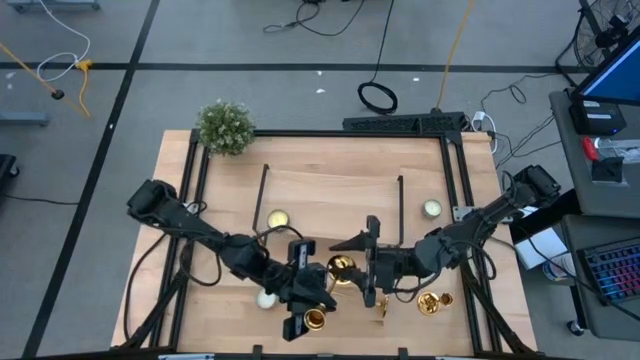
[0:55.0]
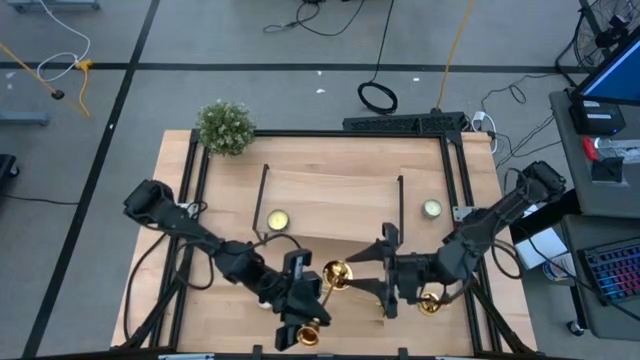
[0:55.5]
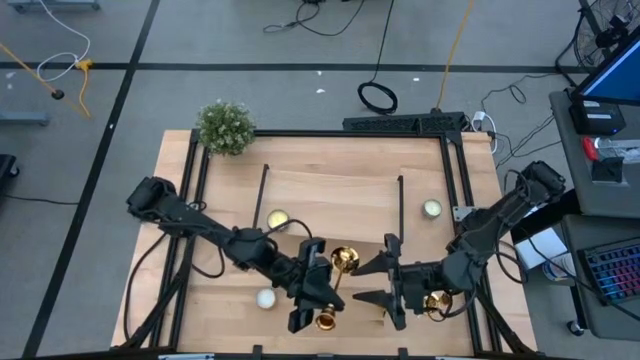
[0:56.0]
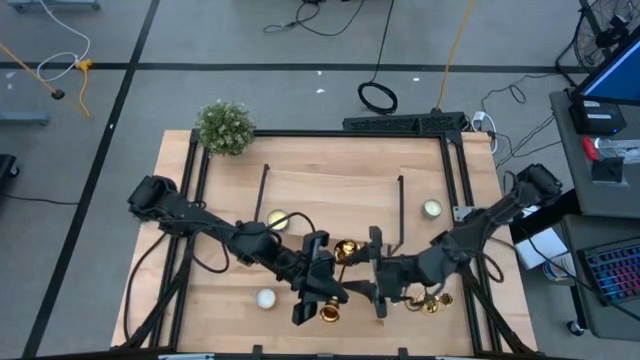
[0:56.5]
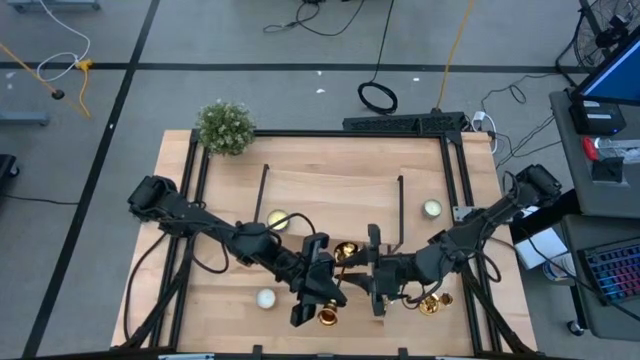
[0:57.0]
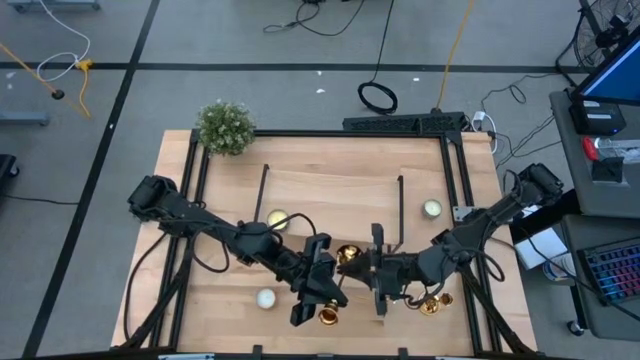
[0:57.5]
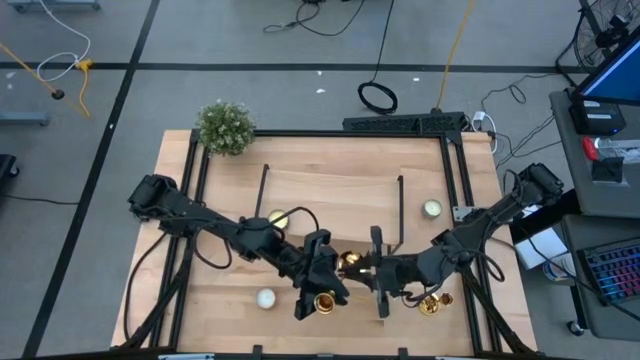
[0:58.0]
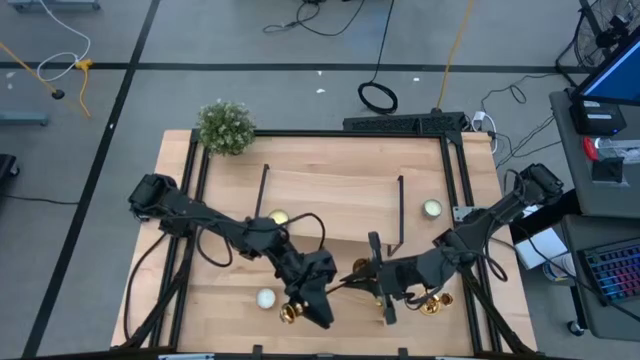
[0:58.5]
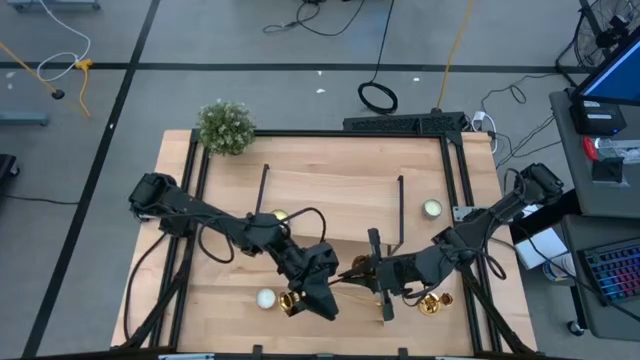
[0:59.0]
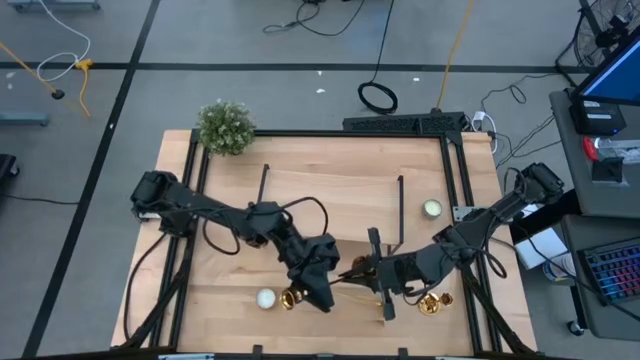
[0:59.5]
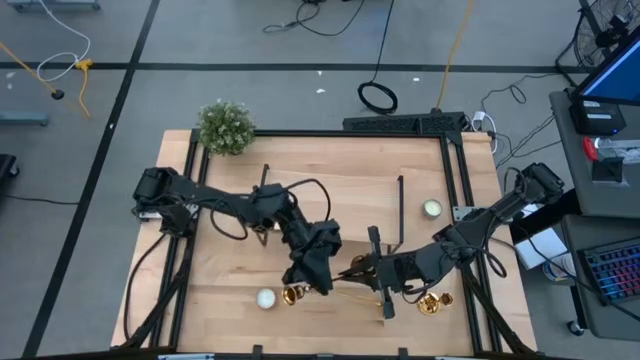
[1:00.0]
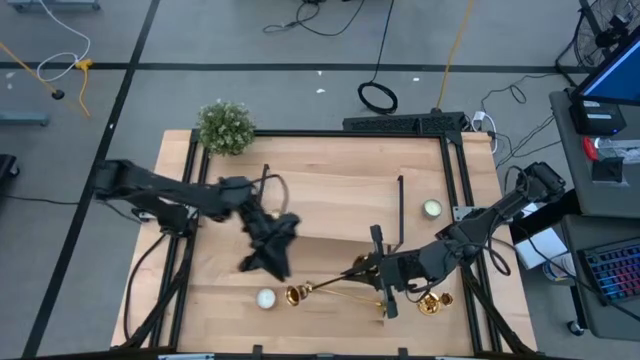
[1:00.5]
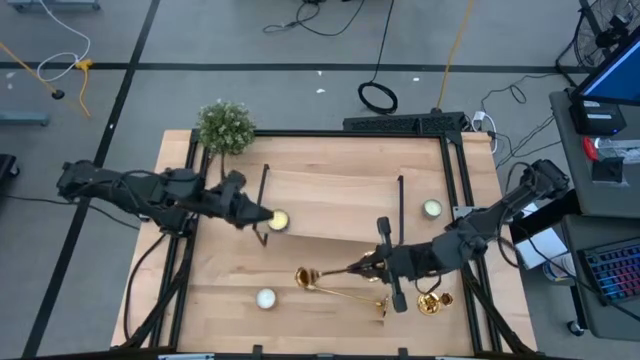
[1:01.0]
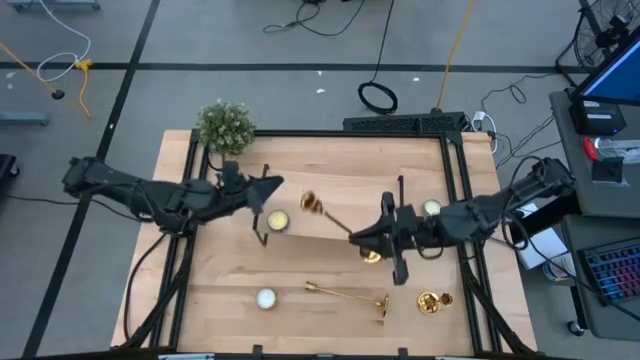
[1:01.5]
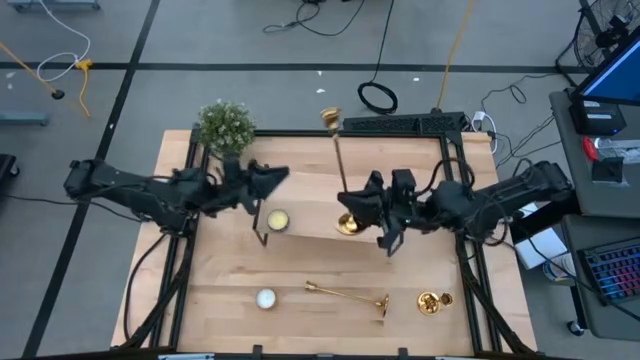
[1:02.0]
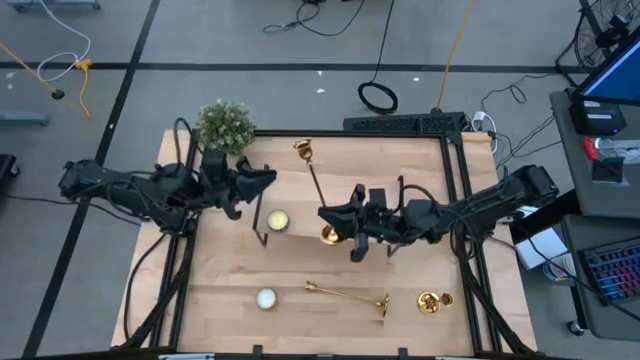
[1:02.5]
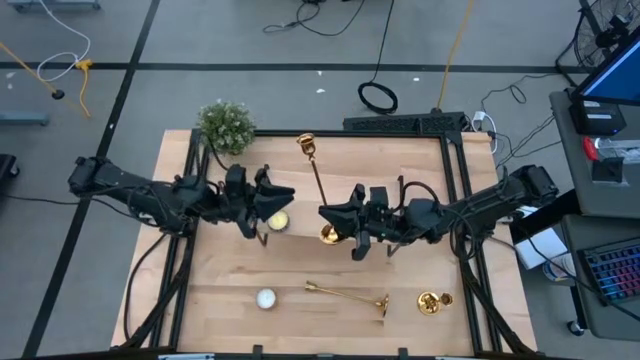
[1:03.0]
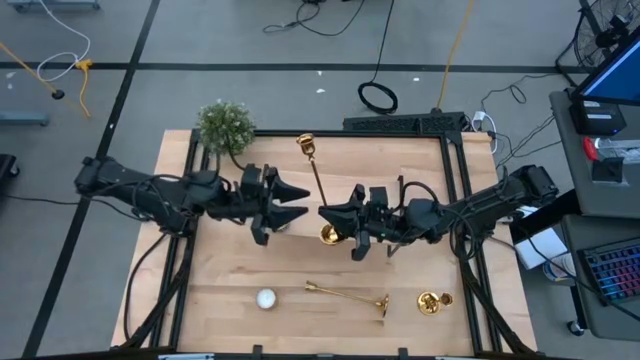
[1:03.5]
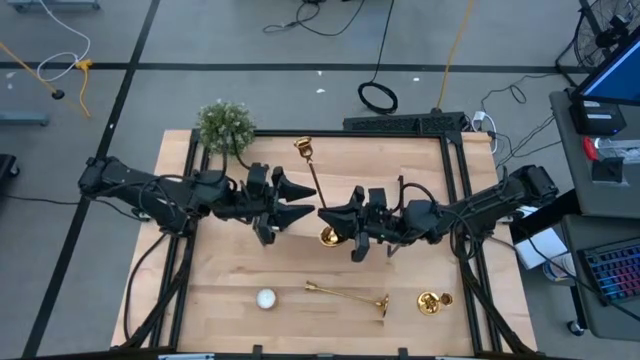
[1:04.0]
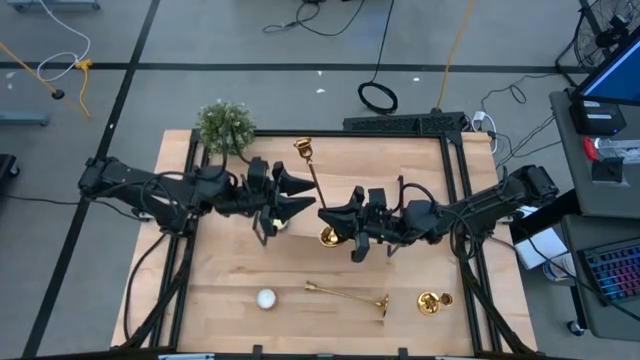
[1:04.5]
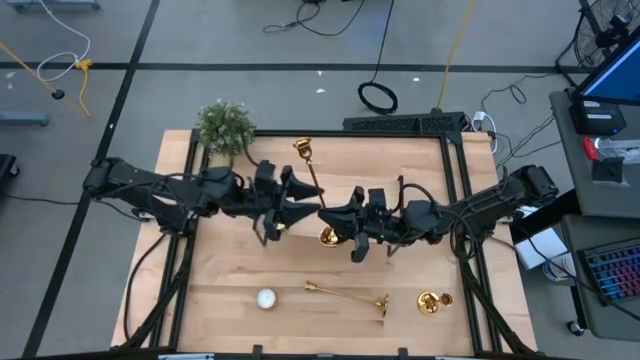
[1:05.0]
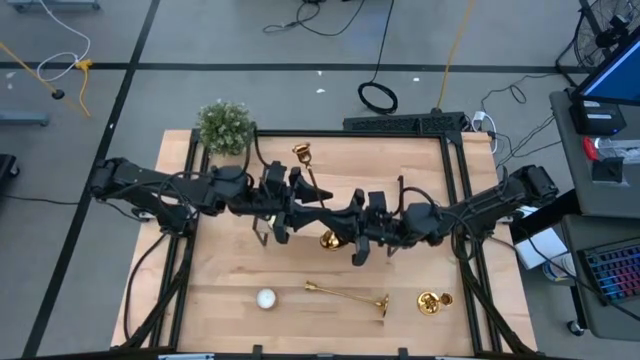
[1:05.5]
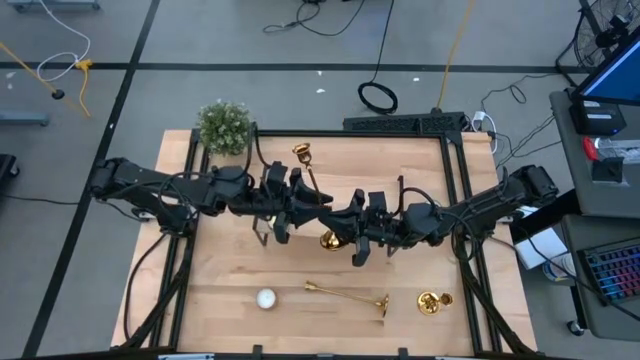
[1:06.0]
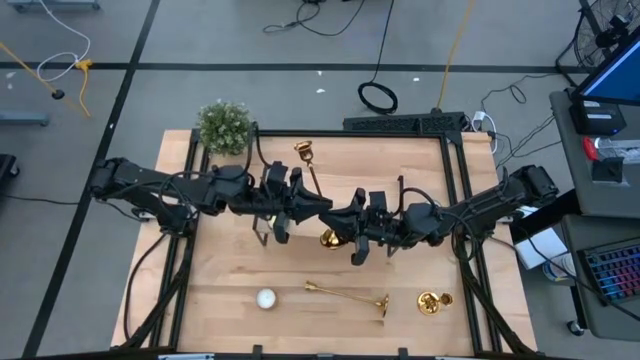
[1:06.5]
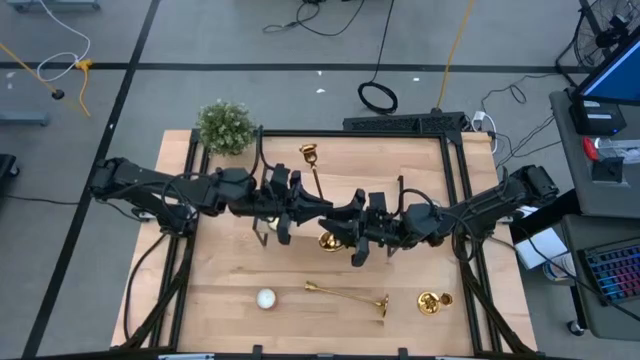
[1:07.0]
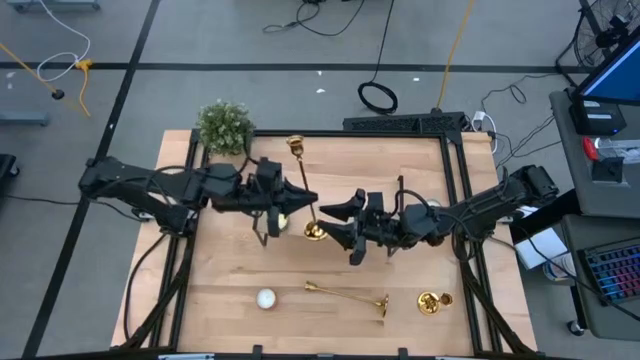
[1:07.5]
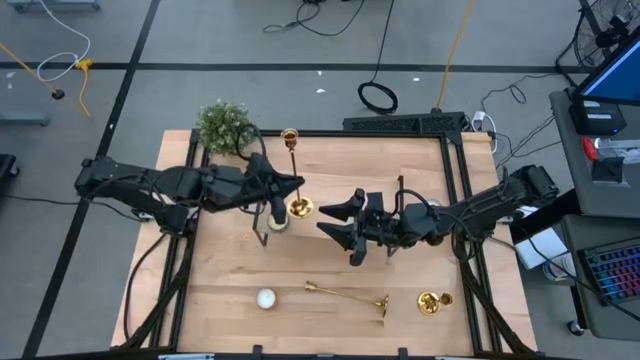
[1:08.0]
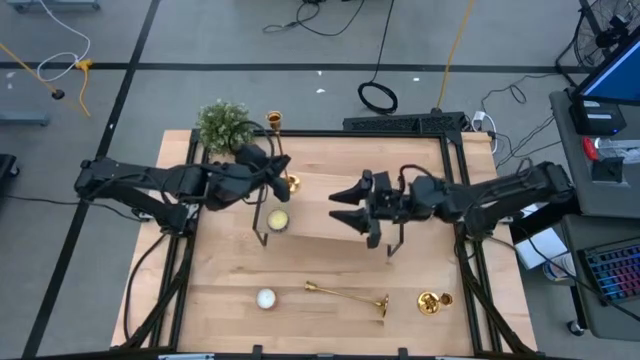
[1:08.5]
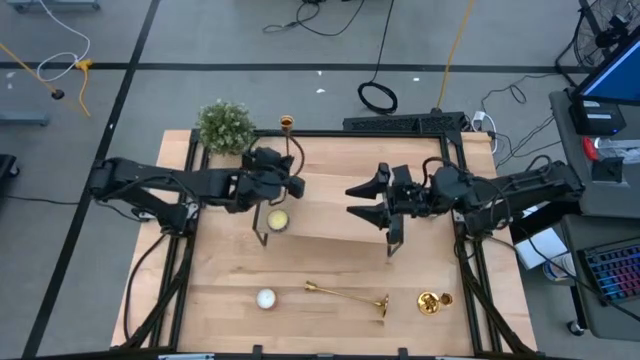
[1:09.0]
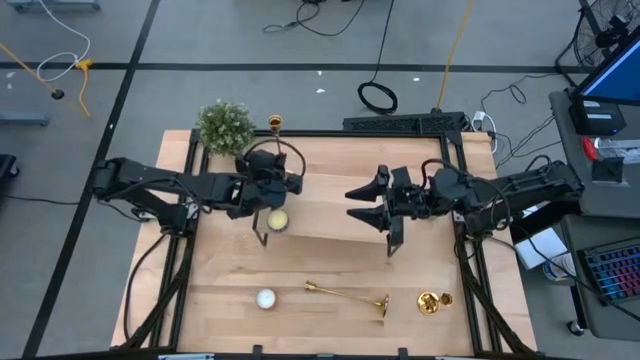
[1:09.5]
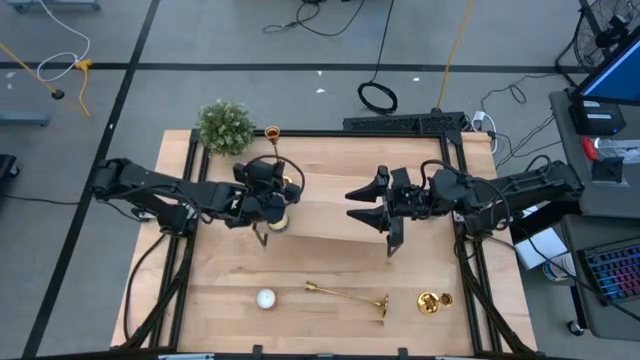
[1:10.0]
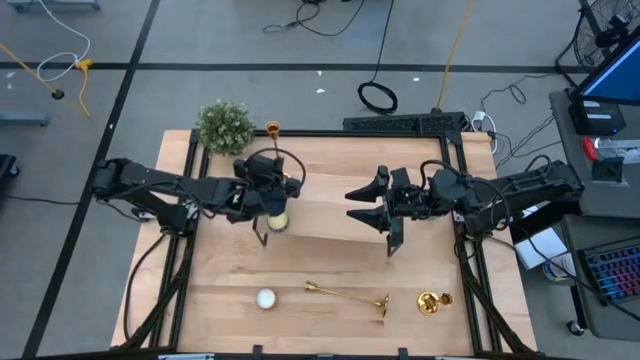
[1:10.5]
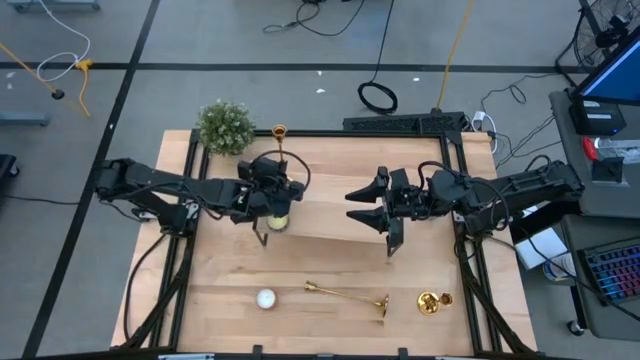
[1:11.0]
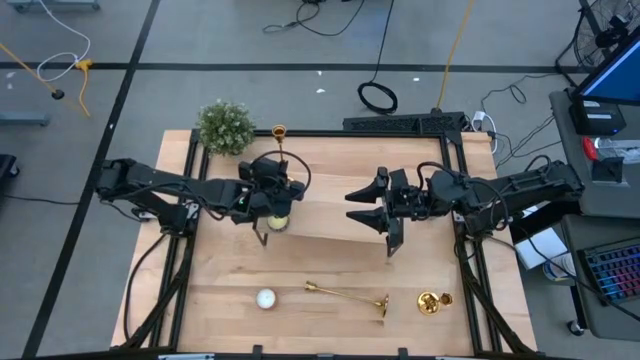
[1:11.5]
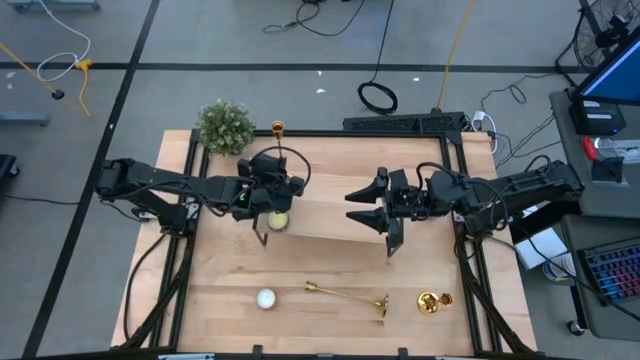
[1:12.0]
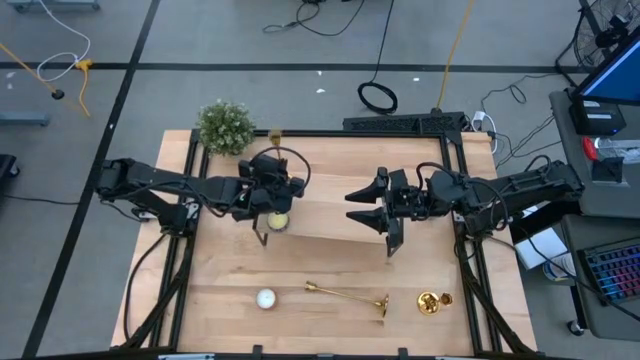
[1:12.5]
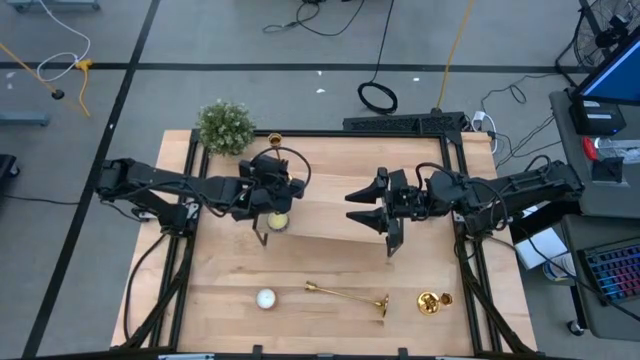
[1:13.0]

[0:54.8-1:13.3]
Task: Pick & Place candle stick holders
Put the left gold candle holder on the shelf
